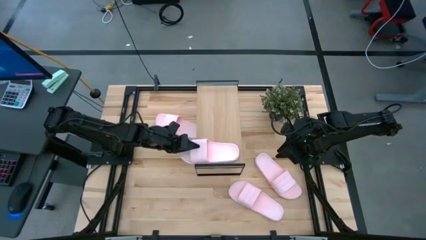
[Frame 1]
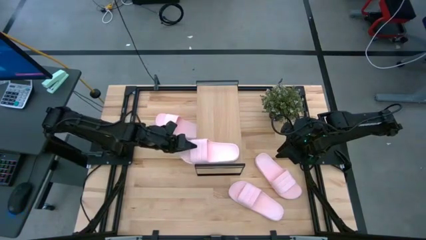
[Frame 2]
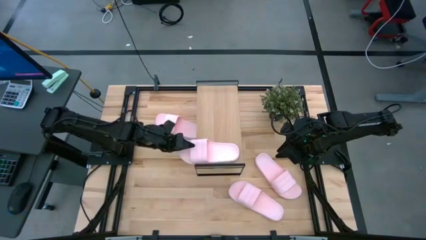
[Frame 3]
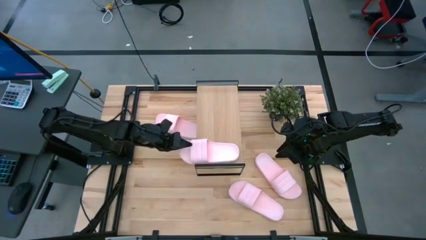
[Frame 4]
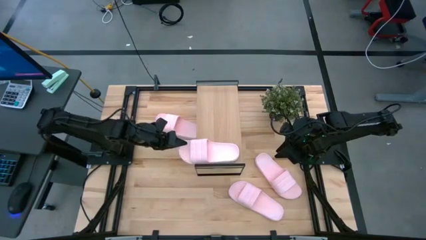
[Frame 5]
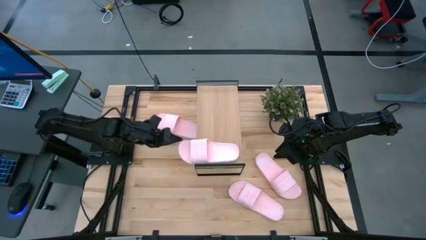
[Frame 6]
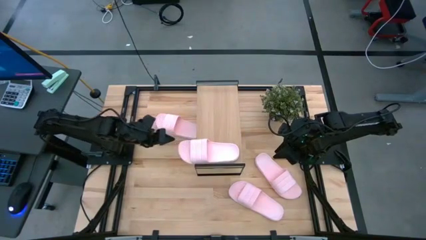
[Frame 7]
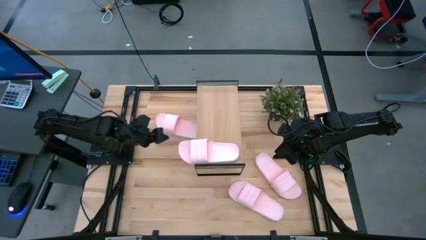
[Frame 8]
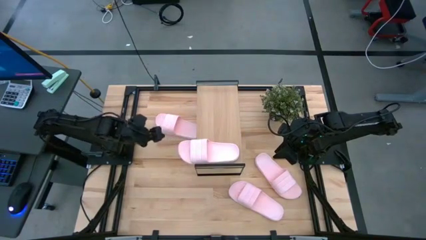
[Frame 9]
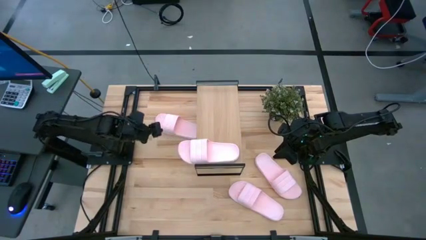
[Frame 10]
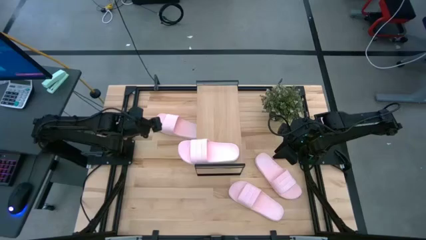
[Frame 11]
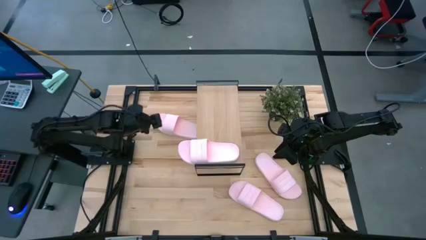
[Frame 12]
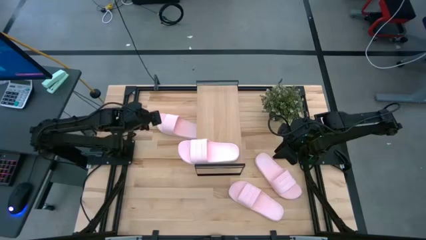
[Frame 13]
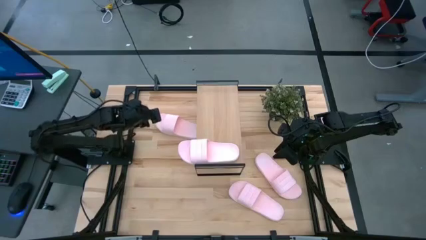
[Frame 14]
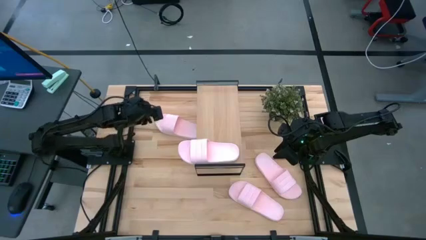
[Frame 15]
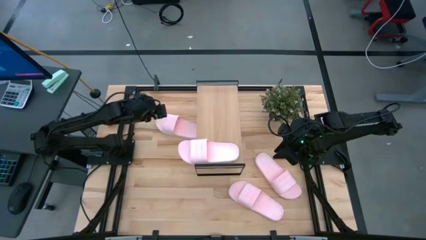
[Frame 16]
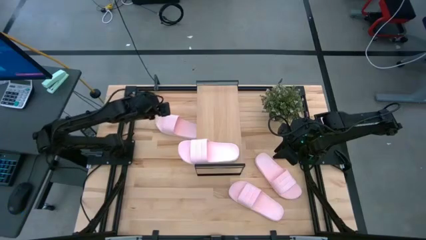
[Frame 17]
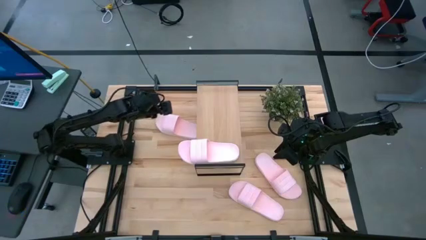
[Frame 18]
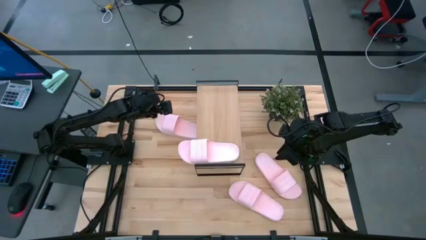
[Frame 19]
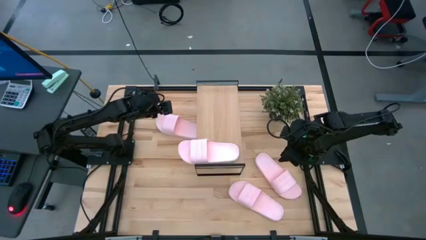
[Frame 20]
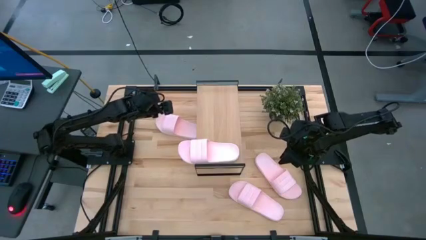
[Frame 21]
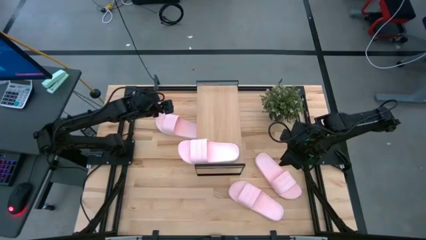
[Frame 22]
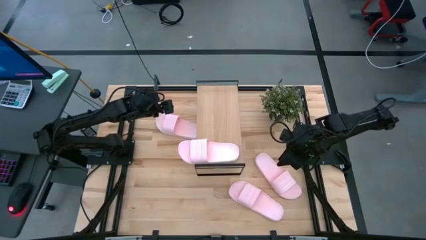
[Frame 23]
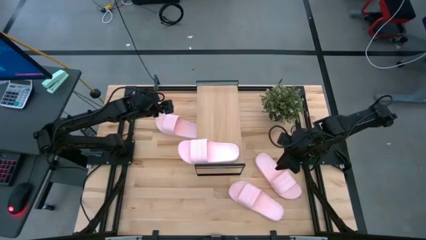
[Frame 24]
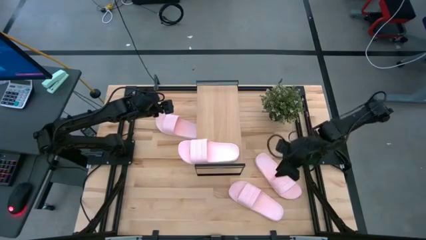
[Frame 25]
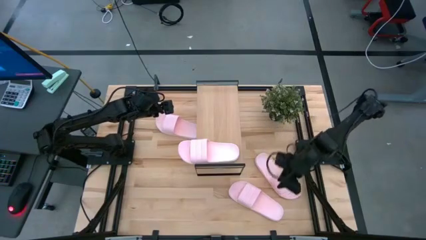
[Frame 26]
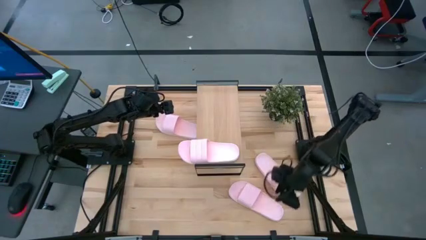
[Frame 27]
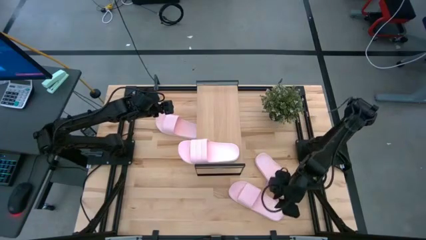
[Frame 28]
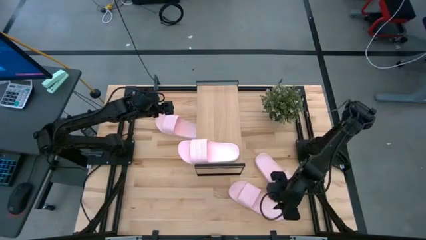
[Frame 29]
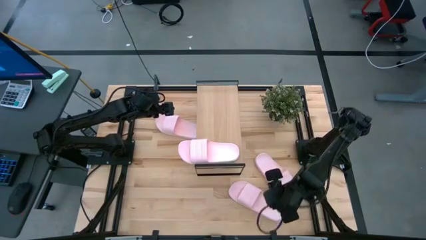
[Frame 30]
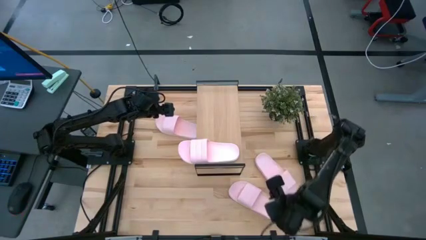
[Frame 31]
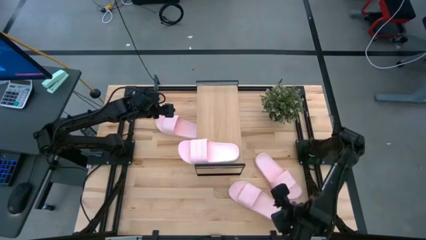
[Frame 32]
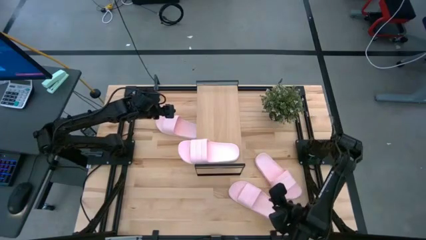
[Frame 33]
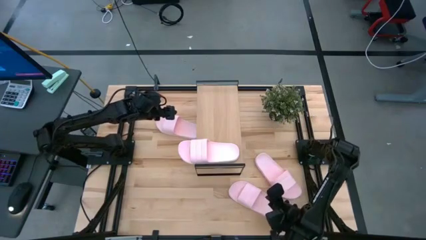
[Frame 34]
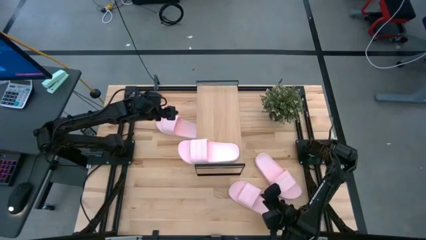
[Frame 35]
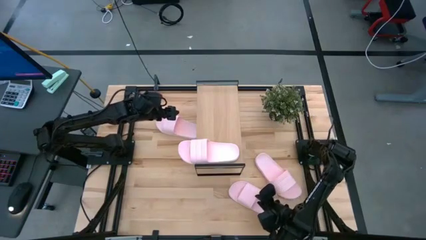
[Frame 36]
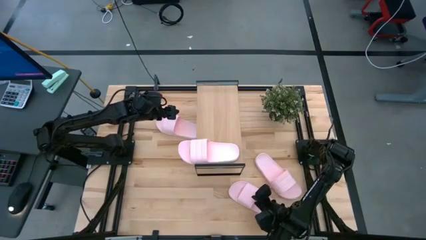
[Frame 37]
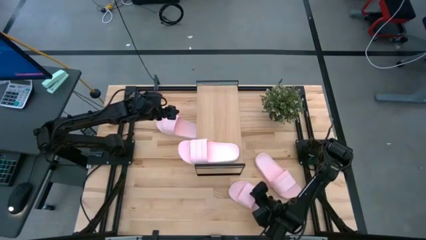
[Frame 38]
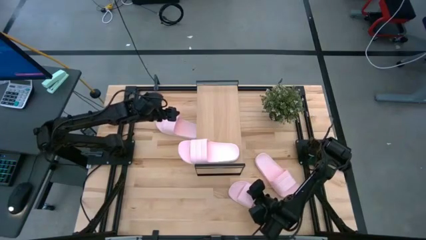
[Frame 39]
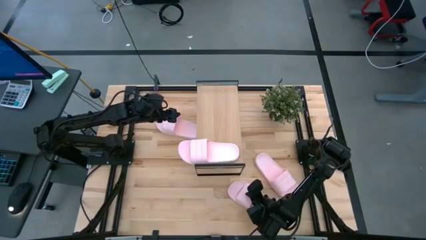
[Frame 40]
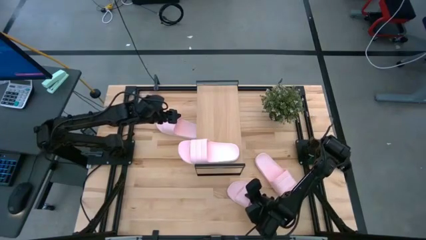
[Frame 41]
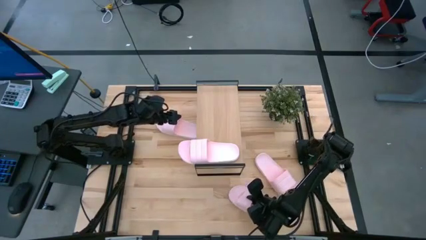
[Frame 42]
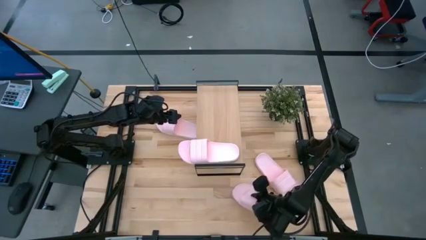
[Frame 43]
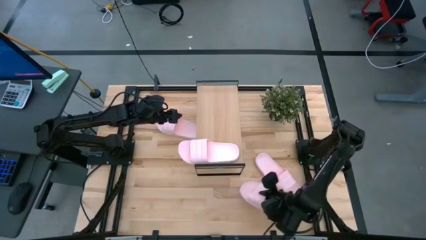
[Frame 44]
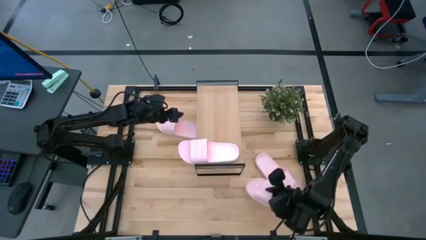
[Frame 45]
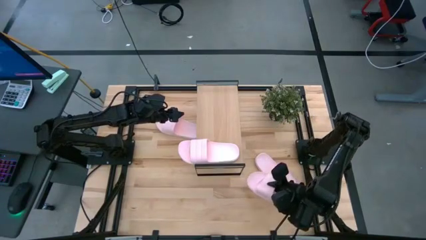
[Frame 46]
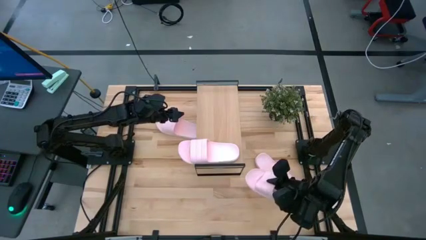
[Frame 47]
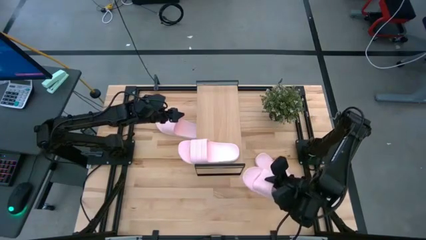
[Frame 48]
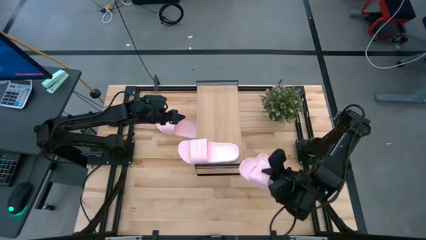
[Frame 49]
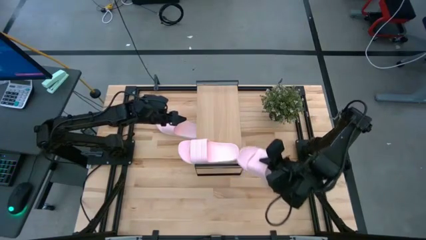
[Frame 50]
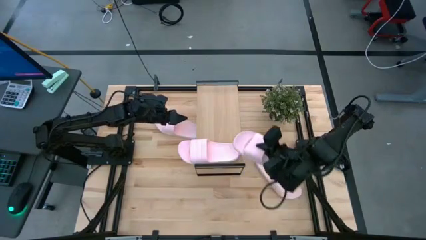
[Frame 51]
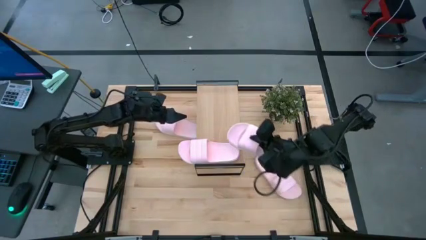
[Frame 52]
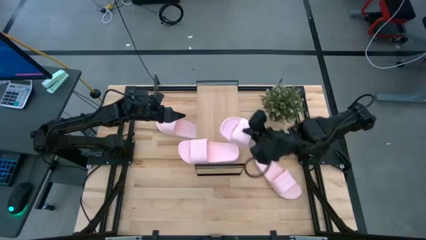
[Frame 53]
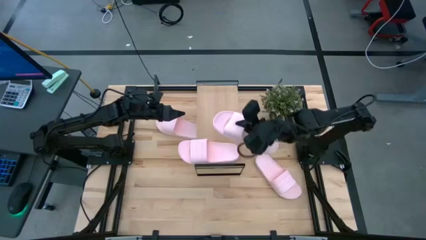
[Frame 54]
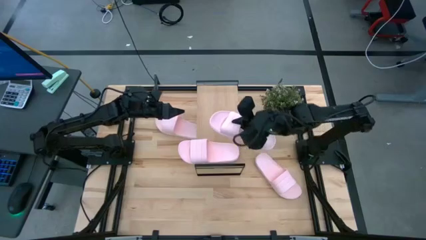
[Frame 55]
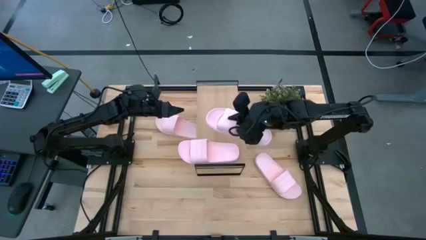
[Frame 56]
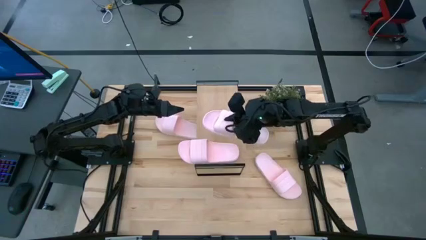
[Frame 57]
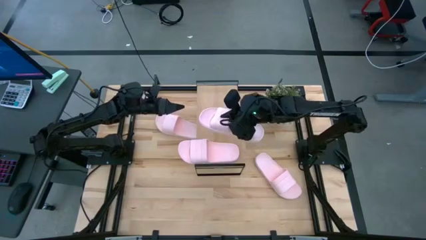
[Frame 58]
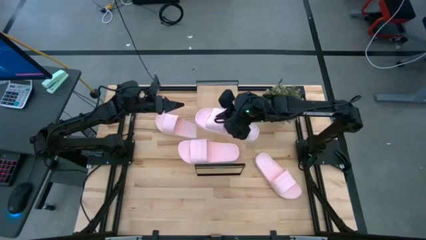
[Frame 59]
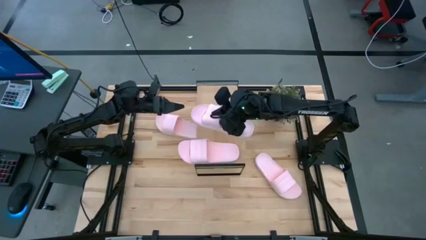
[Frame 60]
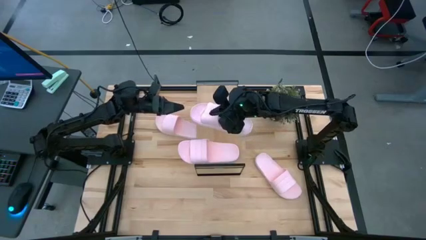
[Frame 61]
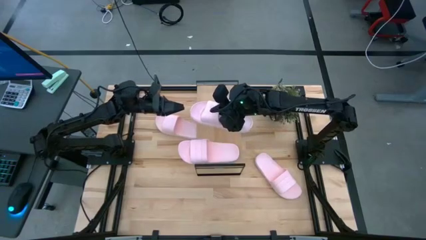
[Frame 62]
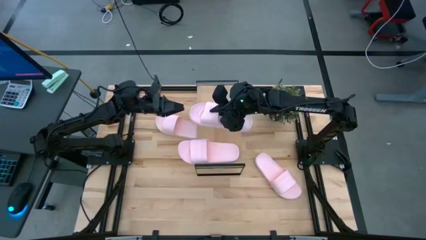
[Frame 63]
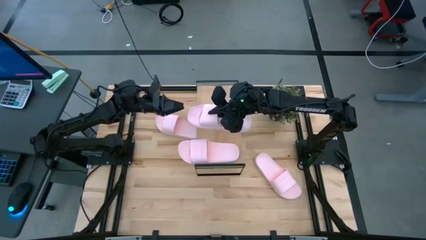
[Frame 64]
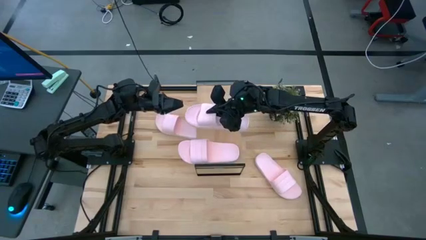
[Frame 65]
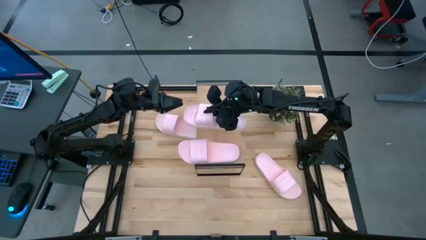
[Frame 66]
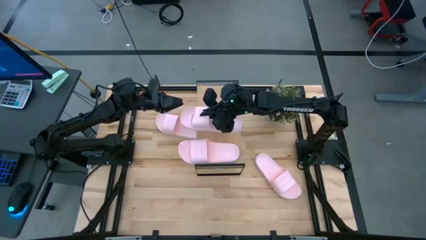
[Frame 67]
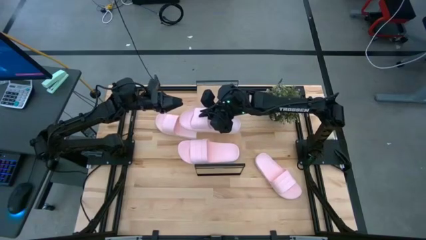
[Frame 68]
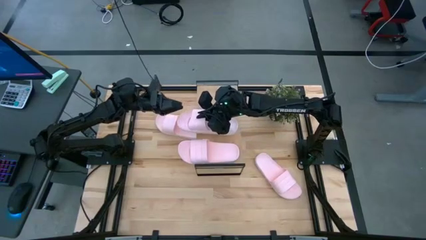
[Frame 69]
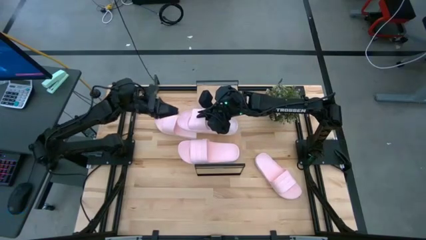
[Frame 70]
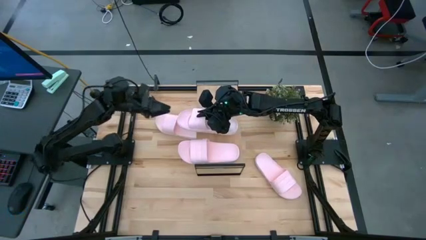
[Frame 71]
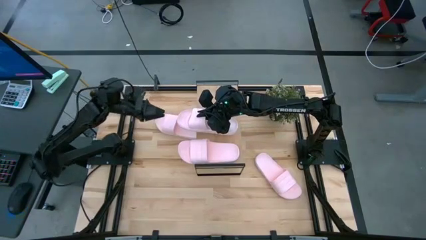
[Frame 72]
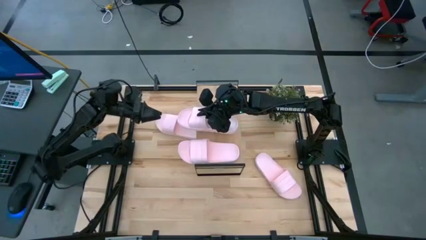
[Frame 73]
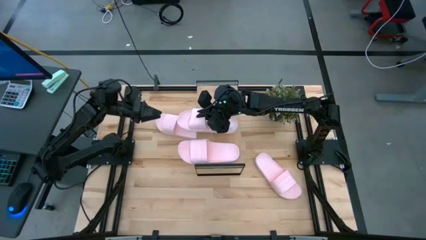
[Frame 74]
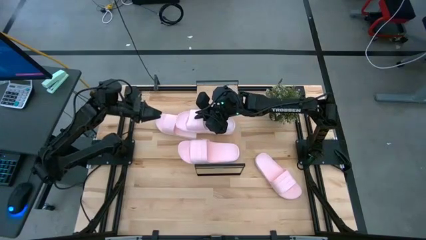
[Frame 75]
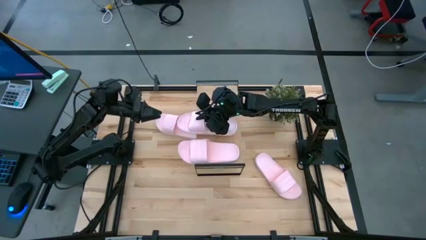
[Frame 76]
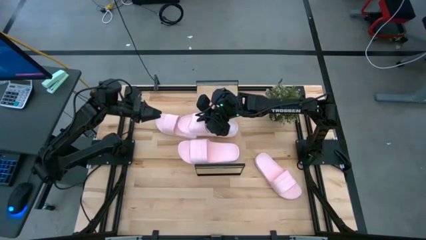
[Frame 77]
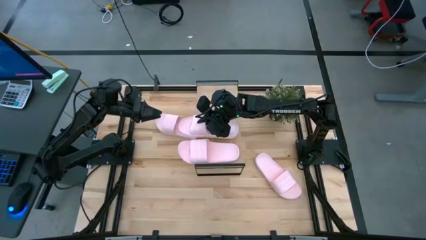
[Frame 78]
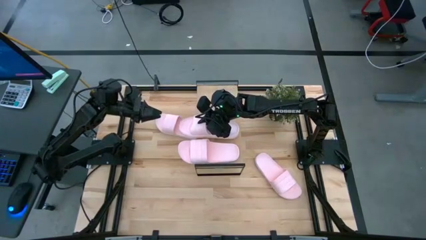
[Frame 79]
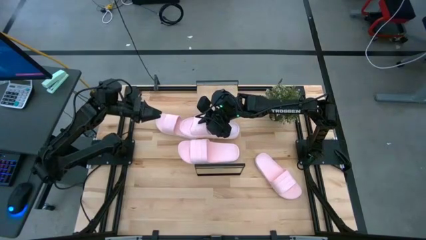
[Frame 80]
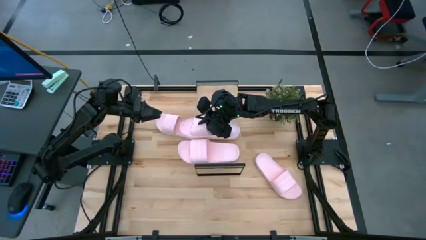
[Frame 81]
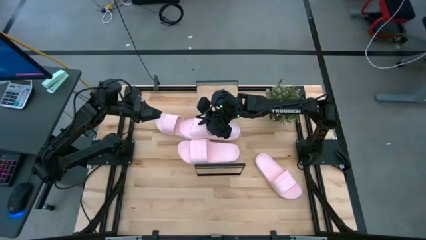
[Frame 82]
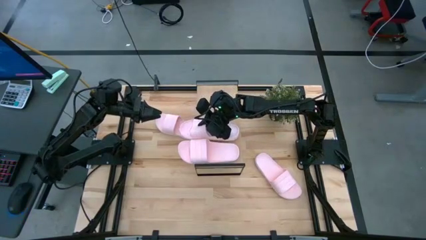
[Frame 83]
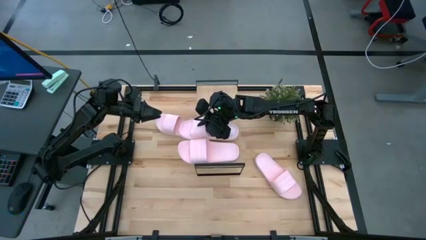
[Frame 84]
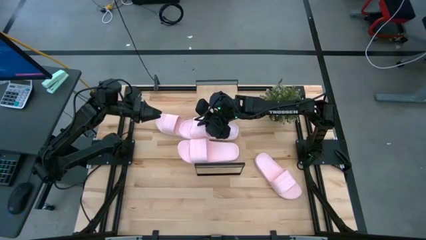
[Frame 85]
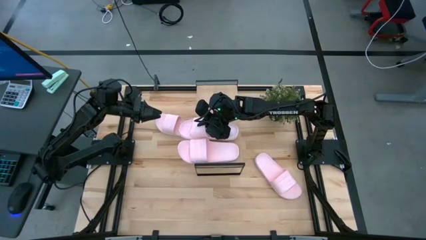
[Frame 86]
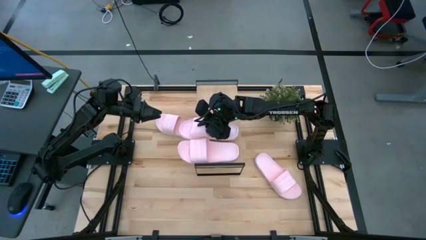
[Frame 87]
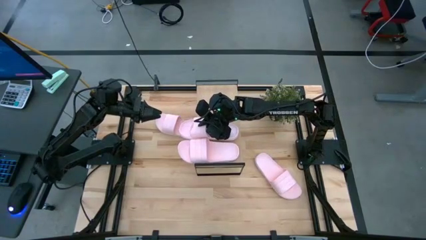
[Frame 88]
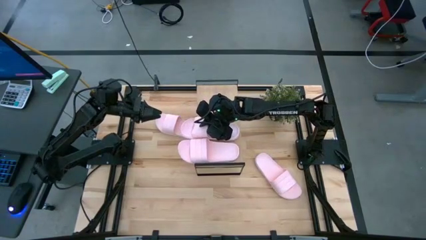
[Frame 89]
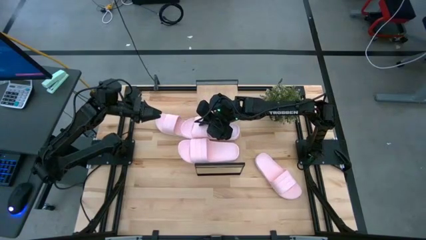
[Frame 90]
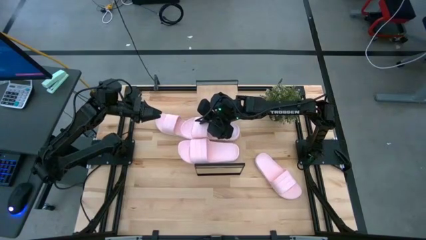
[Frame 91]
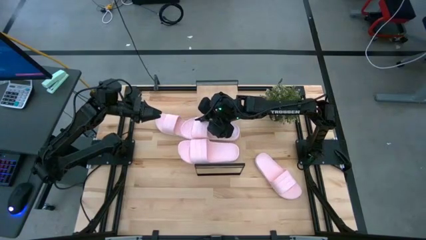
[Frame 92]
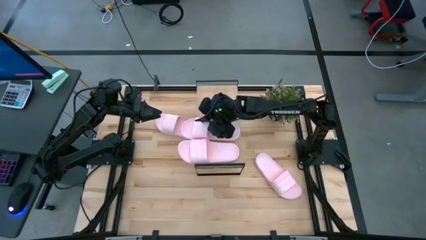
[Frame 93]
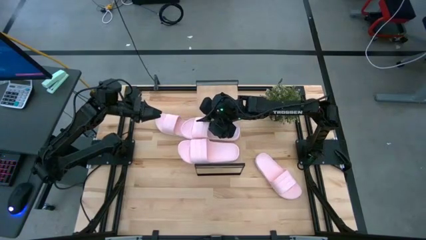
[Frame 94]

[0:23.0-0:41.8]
Task: Pick and place slides into the shelf
Put the pink slipper on the shelf
